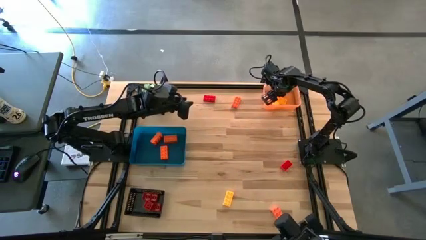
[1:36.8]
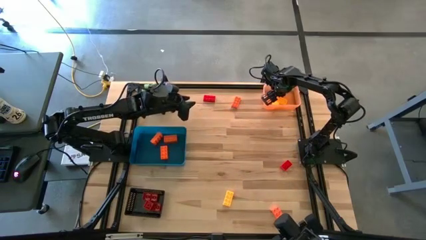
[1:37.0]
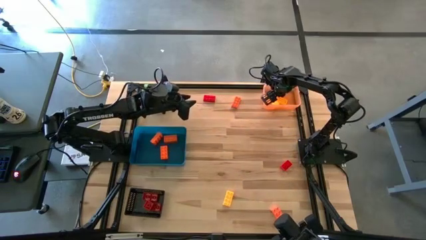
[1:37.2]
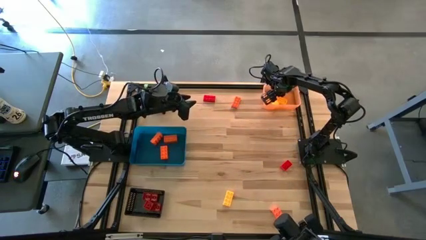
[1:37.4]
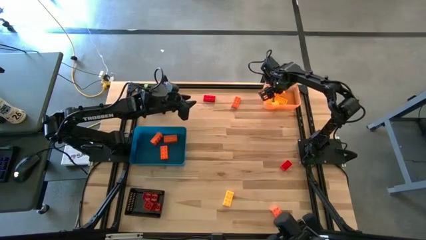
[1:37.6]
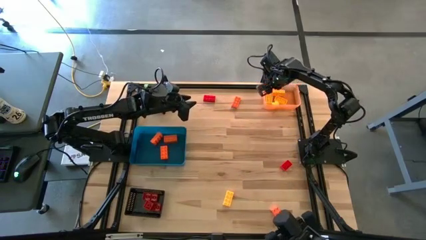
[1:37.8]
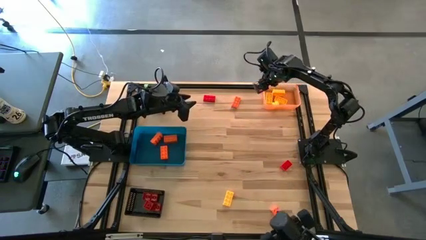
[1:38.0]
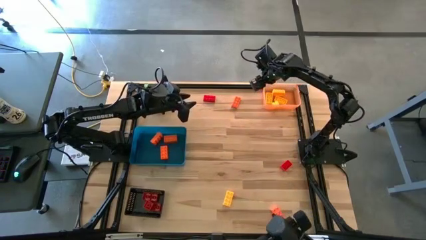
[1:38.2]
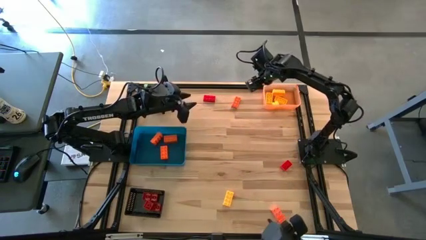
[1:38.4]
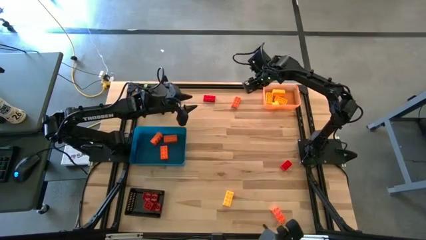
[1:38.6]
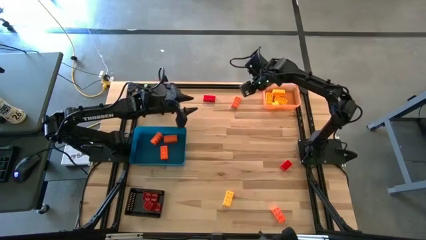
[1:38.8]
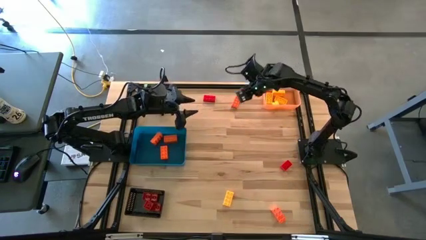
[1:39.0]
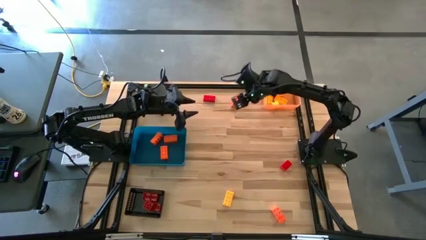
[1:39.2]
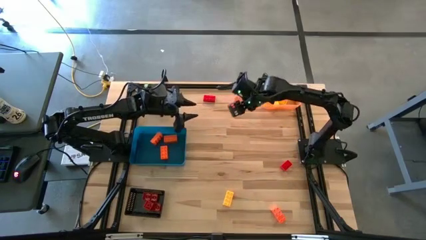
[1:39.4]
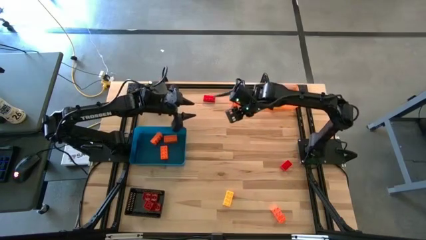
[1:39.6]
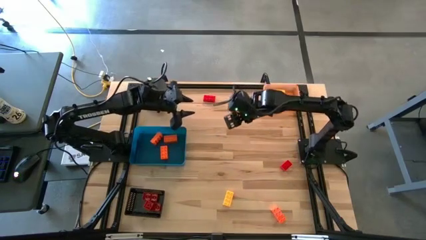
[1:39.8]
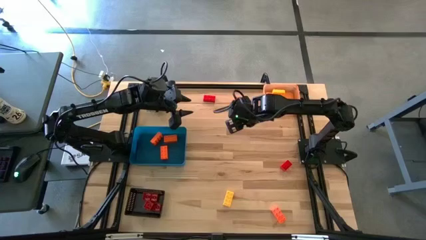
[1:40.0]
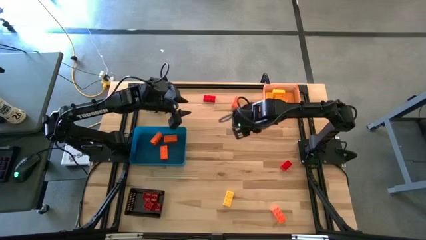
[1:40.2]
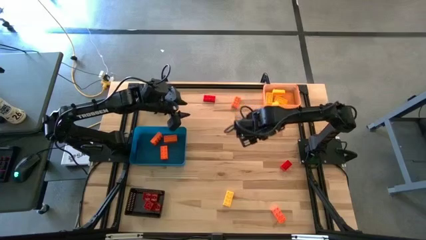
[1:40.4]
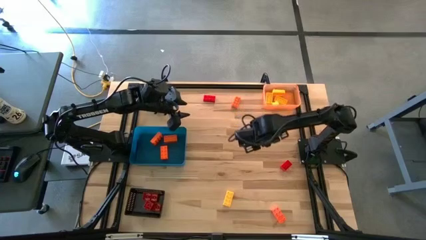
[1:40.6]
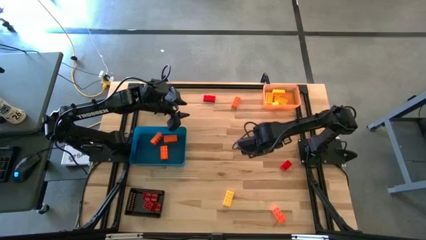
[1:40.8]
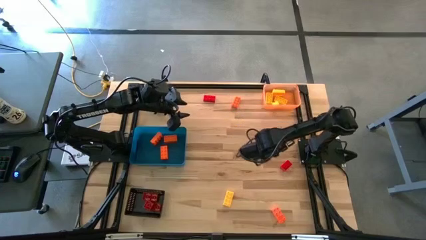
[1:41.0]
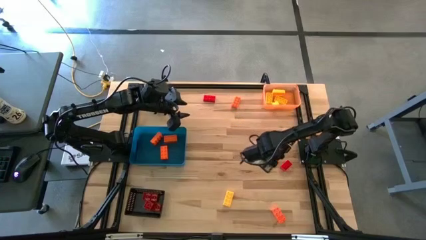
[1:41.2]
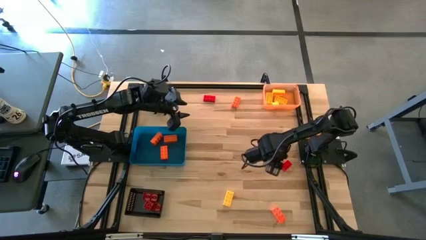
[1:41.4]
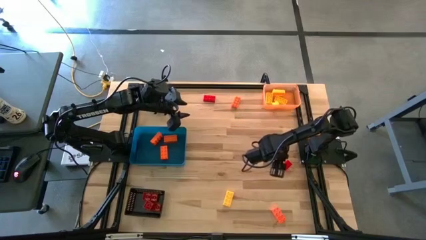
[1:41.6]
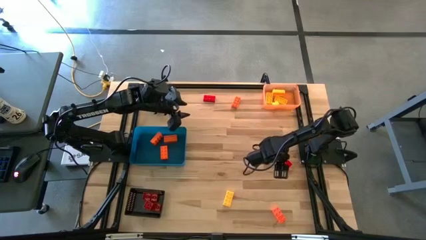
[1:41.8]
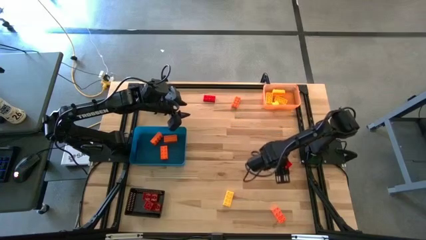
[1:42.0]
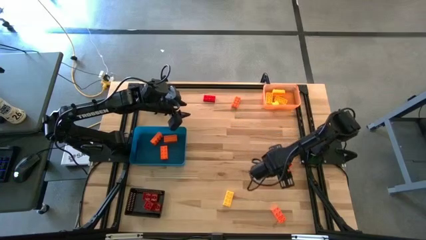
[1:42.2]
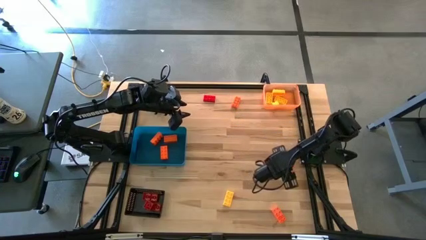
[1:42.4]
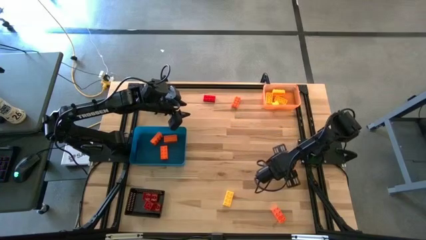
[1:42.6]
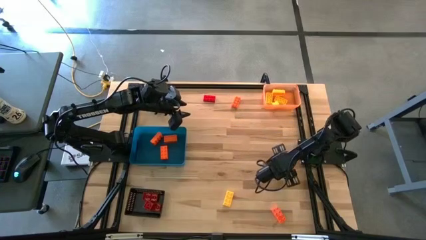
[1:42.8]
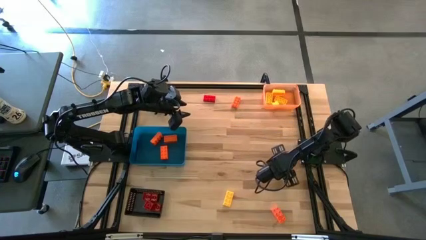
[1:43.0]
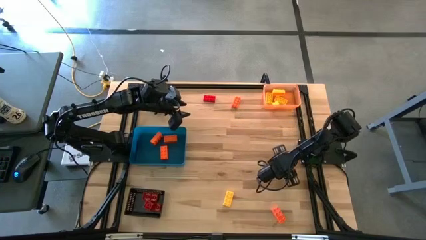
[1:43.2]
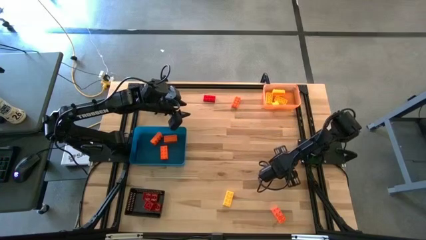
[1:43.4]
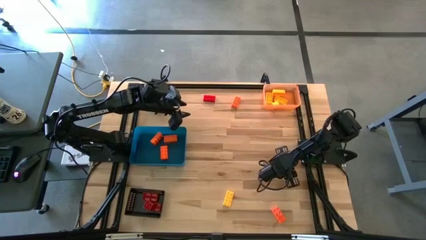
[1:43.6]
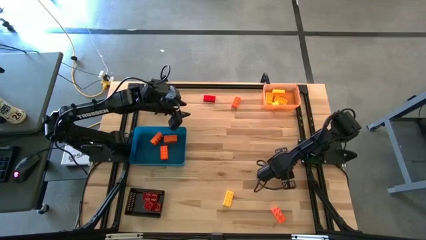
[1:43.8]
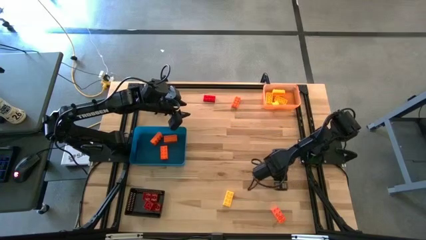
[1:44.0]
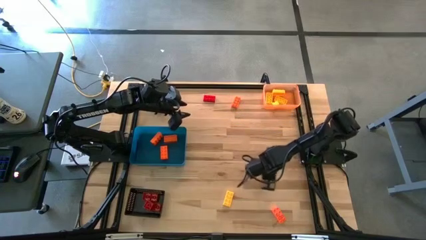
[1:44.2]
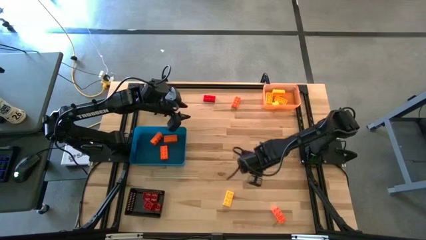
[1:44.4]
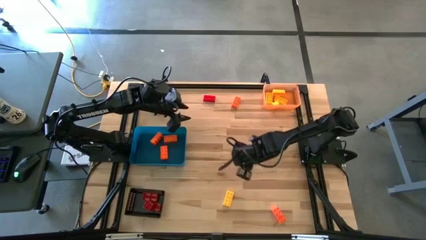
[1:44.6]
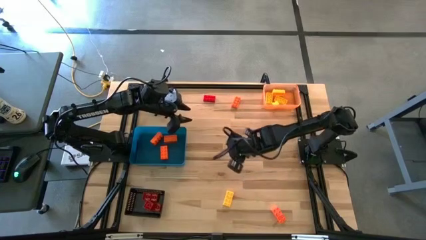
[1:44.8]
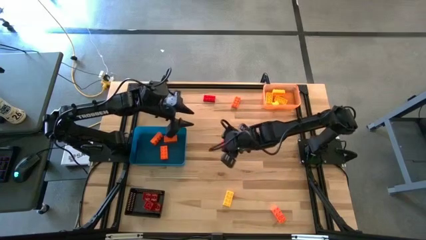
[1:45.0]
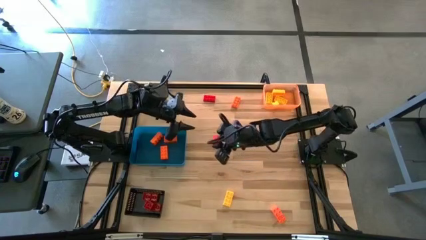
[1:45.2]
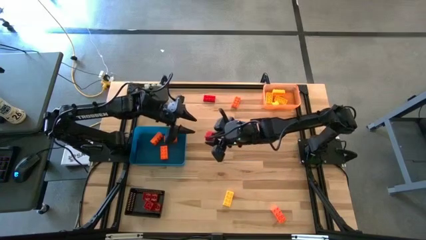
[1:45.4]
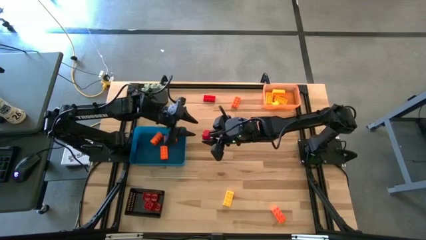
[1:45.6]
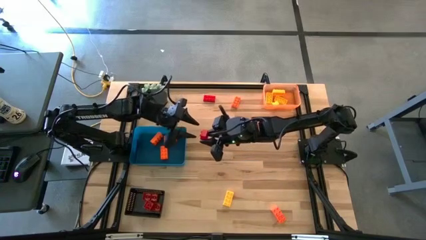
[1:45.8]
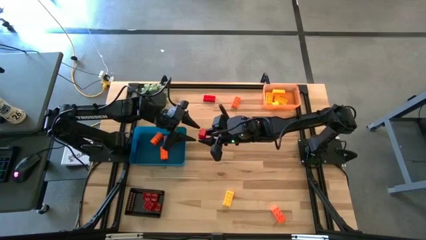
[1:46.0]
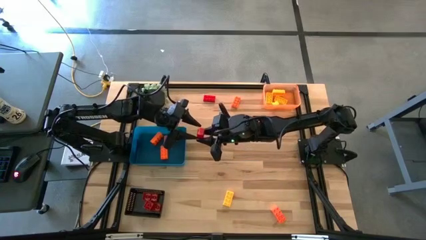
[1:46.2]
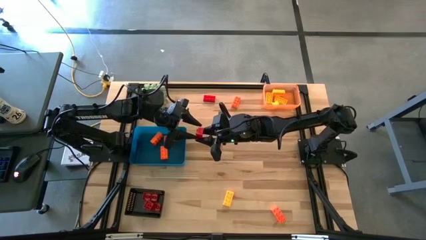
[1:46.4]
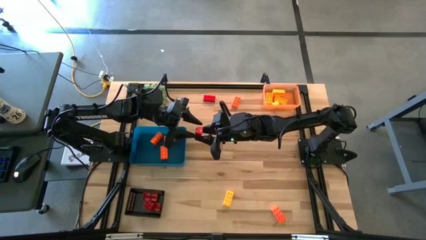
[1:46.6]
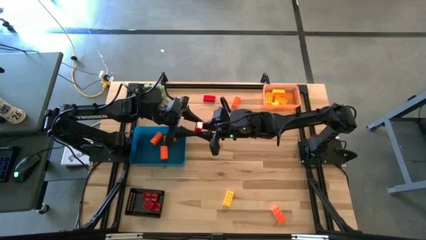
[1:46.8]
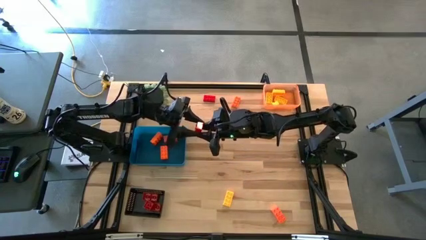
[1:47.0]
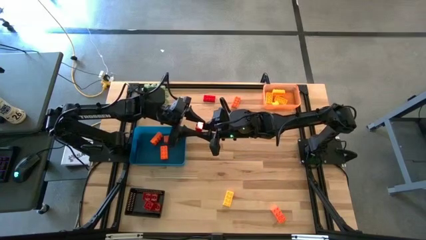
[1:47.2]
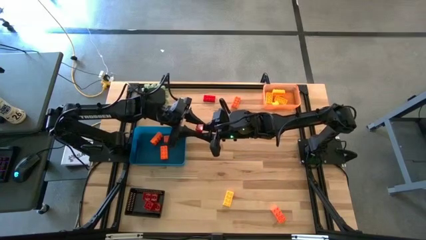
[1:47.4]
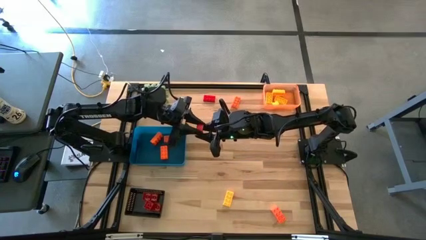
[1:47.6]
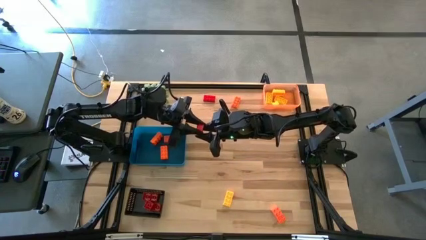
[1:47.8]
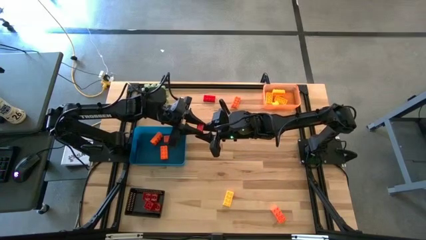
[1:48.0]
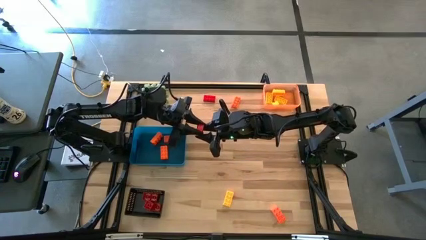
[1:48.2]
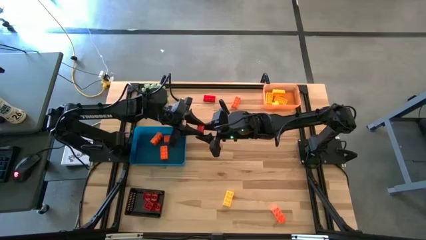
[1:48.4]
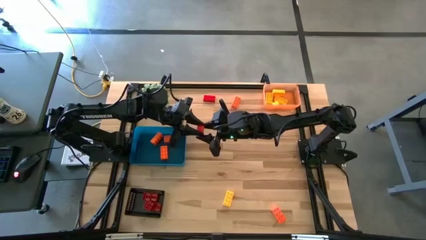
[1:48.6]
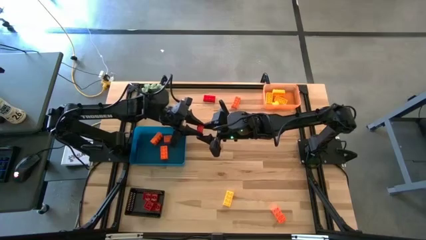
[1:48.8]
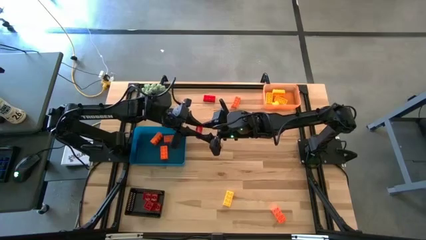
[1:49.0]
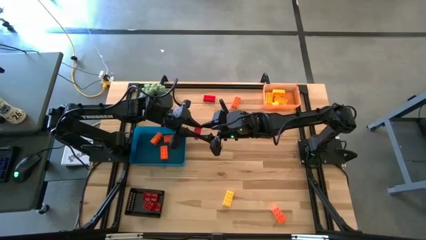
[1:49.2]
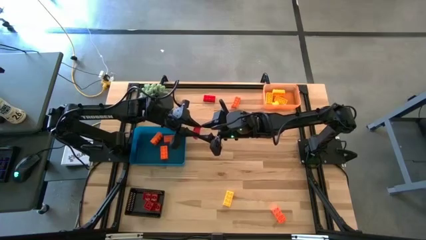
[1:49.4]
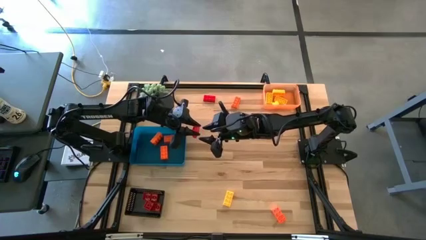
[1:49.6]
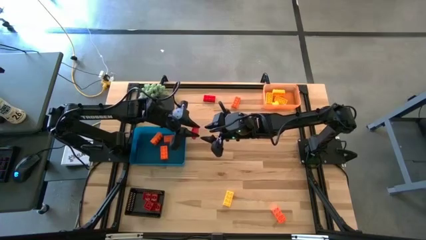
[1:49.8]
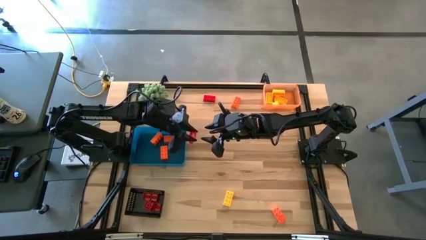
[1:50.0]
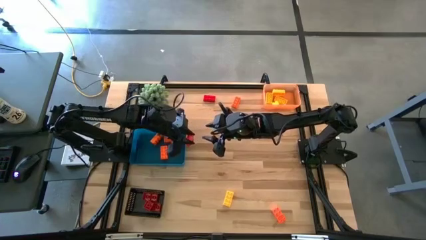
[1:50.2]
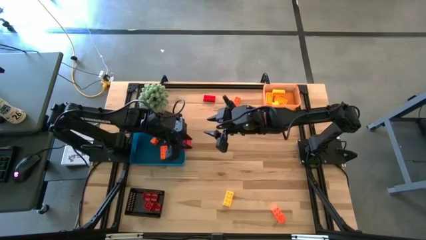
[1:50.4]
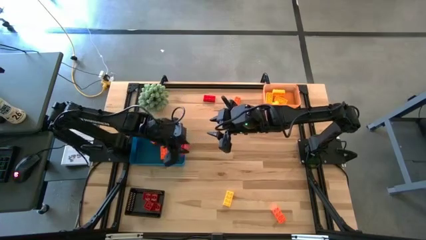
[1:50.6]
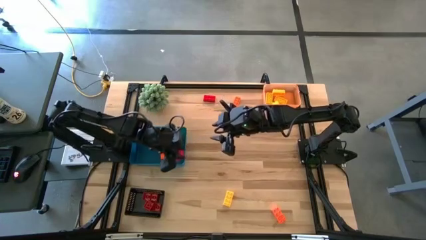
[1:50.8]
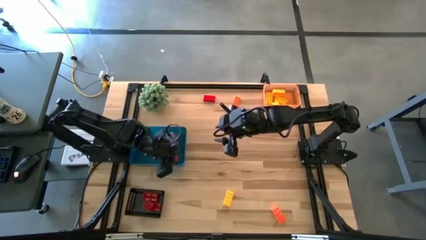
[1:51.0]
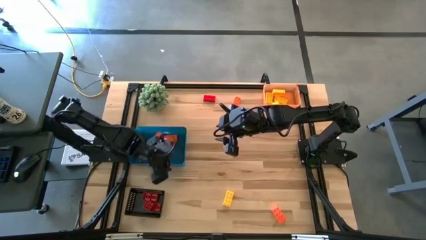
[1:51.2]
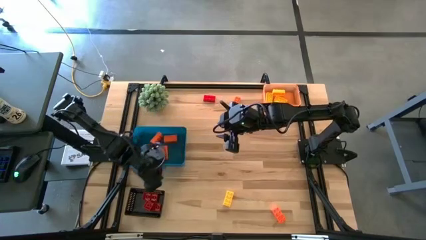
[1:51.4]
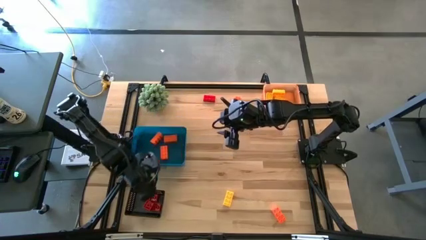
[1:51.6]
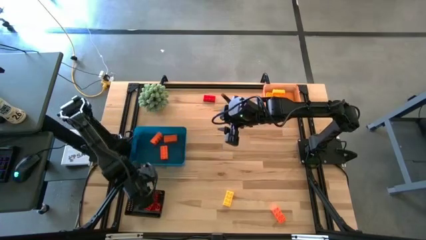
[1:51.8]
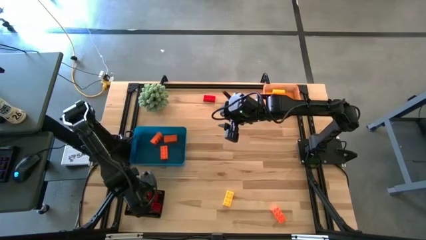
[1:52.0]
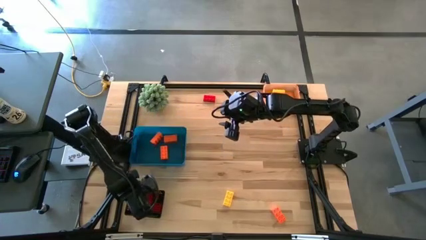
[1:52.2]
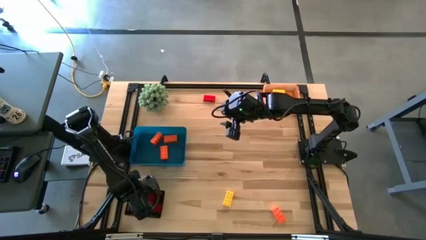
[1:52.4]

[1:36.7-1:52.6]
Task: Sort & place blocks by color
Put the red game piece into the black bin
